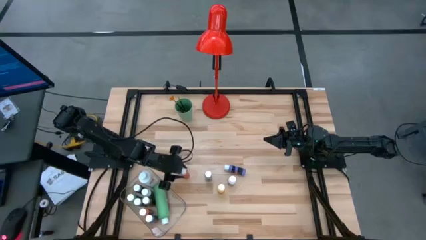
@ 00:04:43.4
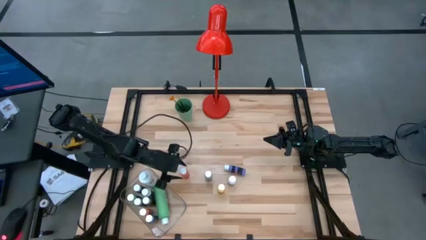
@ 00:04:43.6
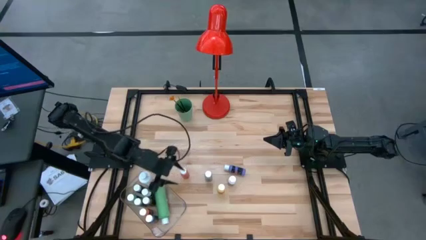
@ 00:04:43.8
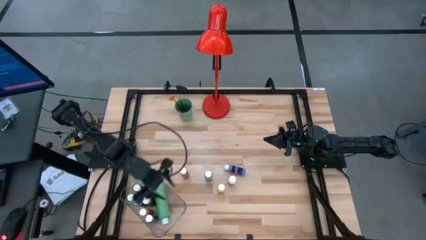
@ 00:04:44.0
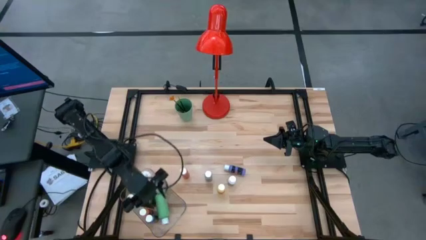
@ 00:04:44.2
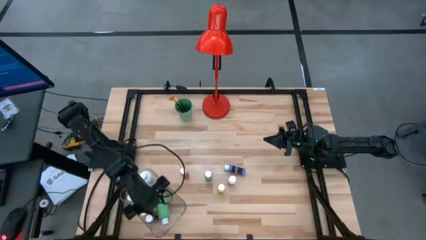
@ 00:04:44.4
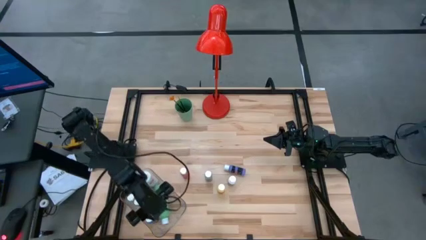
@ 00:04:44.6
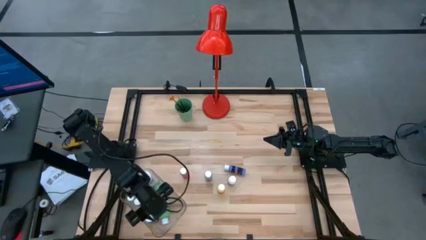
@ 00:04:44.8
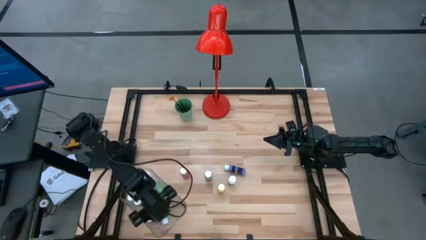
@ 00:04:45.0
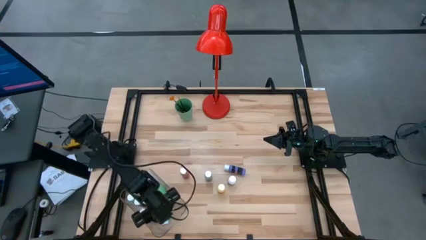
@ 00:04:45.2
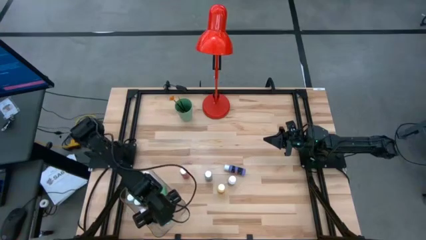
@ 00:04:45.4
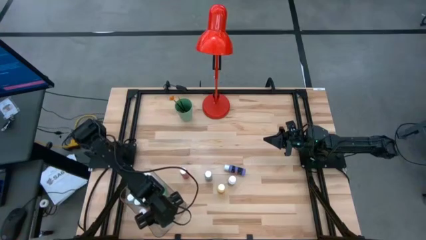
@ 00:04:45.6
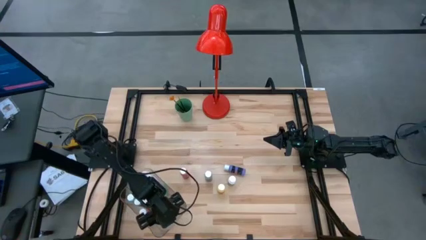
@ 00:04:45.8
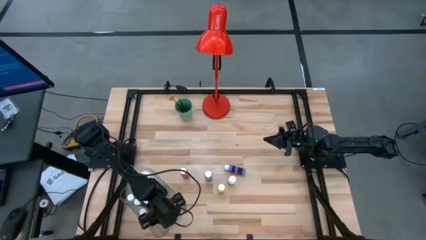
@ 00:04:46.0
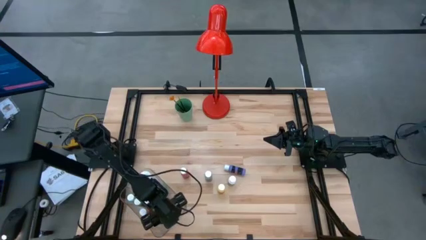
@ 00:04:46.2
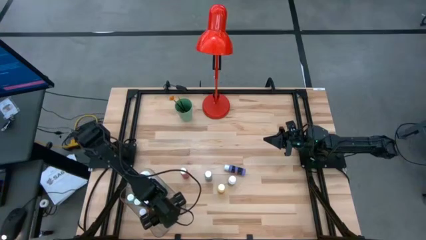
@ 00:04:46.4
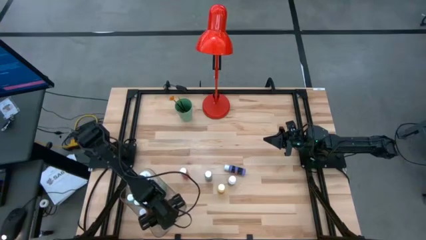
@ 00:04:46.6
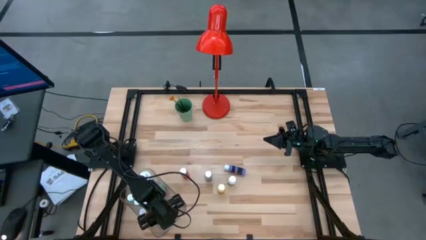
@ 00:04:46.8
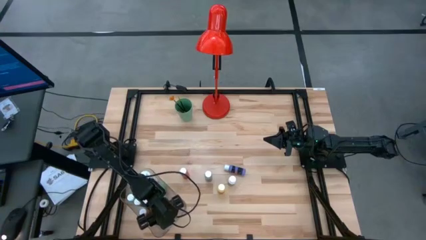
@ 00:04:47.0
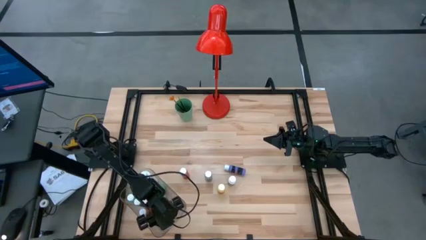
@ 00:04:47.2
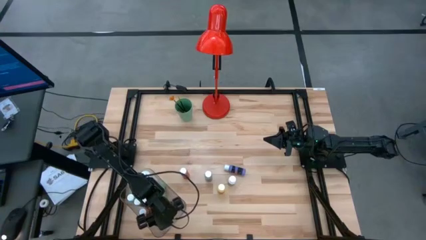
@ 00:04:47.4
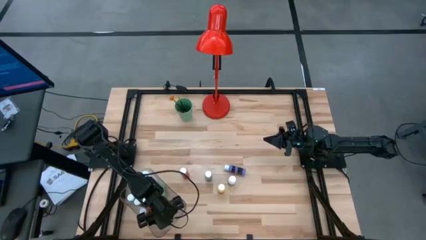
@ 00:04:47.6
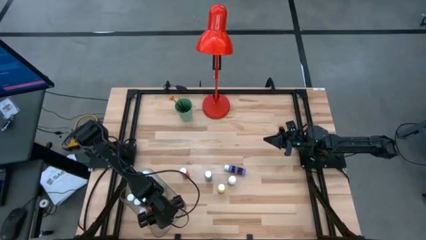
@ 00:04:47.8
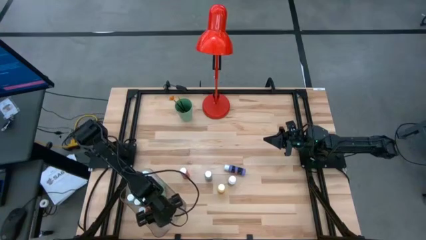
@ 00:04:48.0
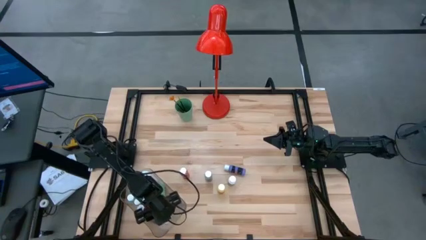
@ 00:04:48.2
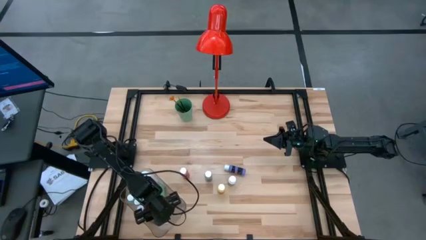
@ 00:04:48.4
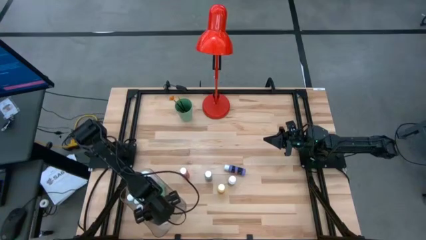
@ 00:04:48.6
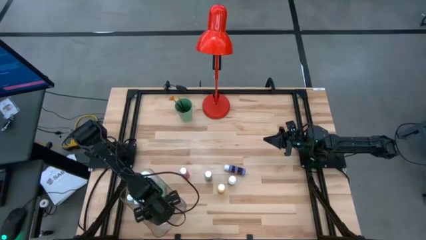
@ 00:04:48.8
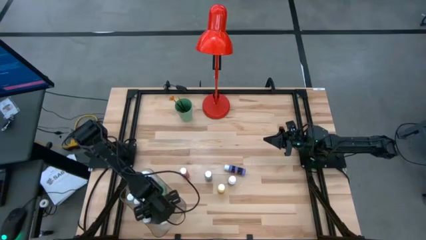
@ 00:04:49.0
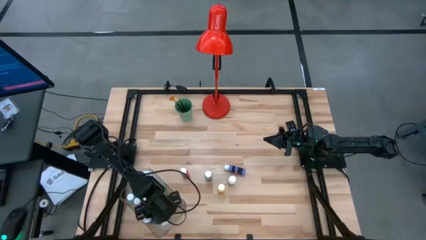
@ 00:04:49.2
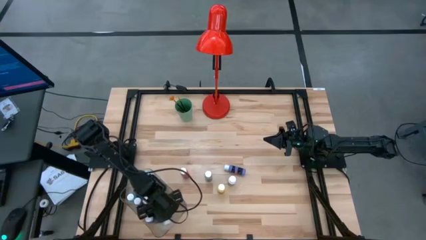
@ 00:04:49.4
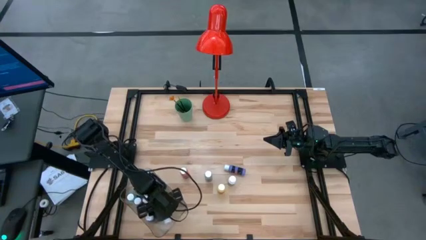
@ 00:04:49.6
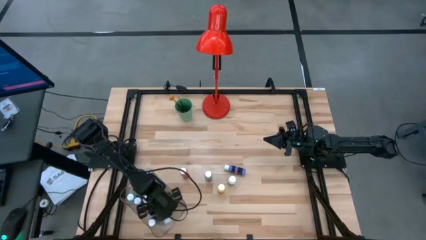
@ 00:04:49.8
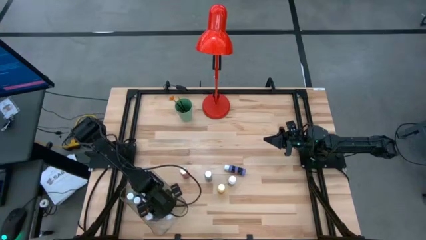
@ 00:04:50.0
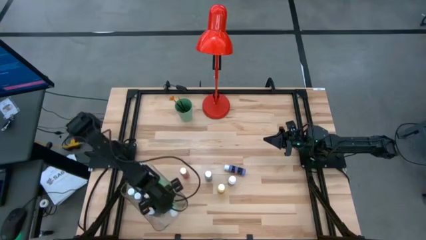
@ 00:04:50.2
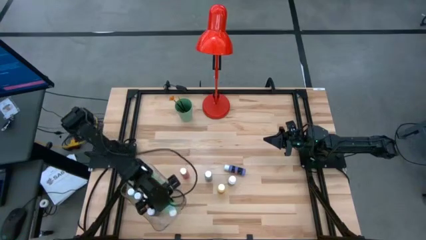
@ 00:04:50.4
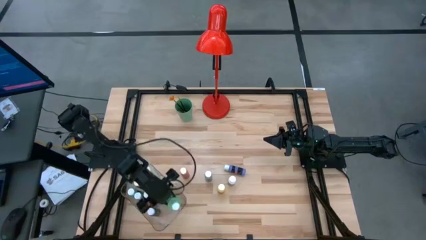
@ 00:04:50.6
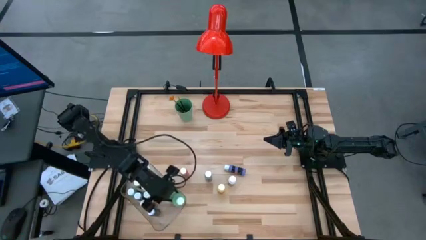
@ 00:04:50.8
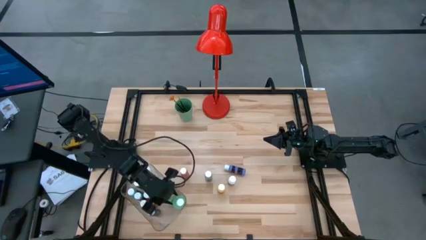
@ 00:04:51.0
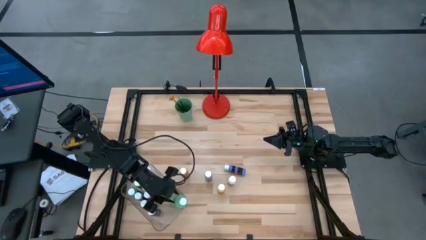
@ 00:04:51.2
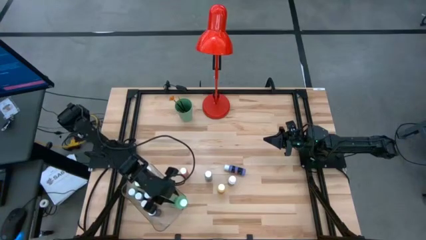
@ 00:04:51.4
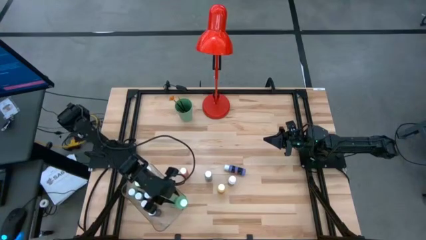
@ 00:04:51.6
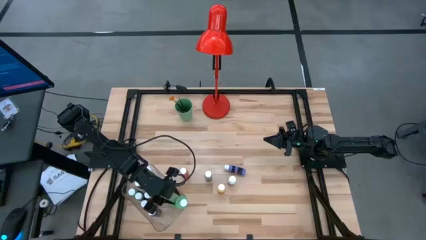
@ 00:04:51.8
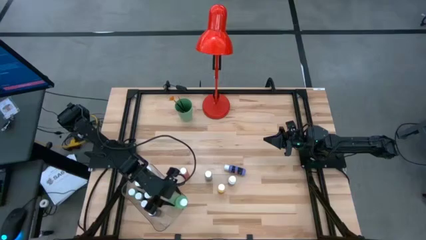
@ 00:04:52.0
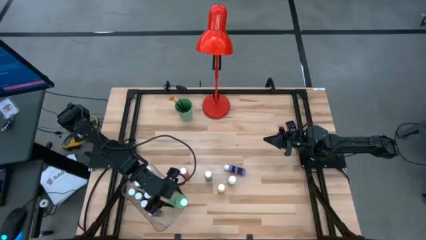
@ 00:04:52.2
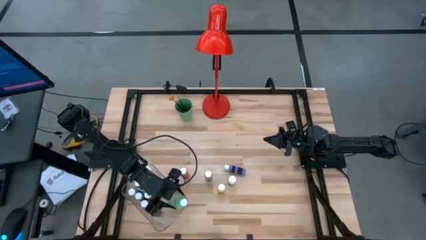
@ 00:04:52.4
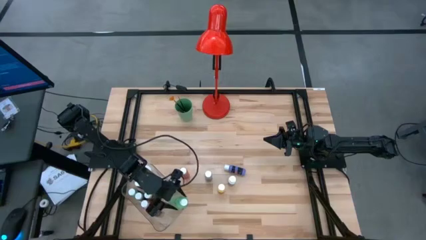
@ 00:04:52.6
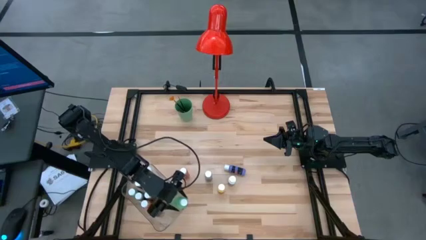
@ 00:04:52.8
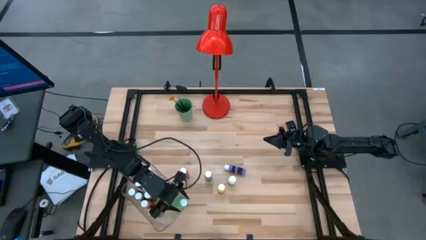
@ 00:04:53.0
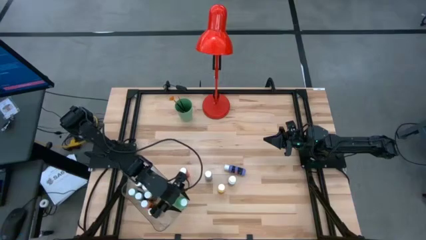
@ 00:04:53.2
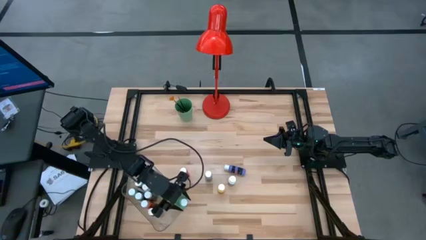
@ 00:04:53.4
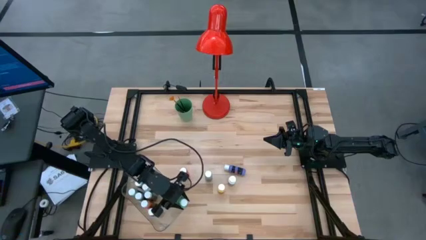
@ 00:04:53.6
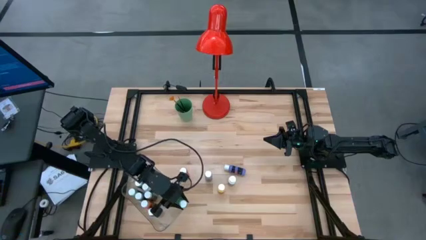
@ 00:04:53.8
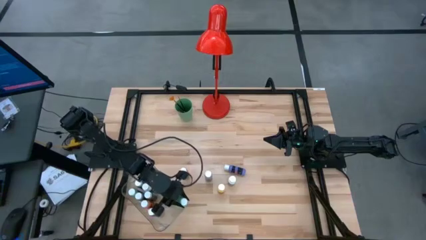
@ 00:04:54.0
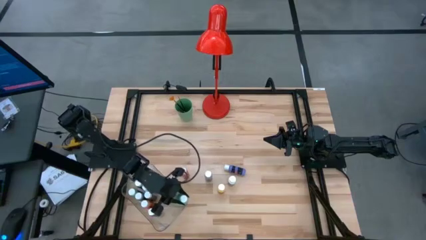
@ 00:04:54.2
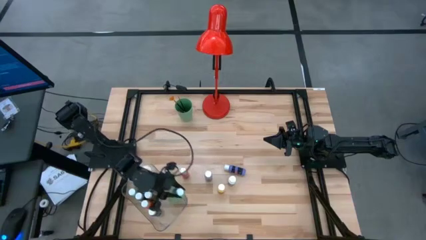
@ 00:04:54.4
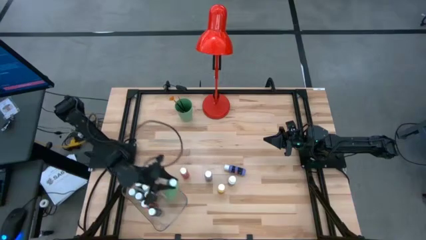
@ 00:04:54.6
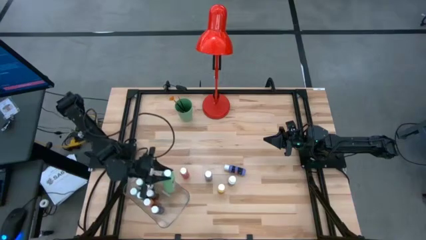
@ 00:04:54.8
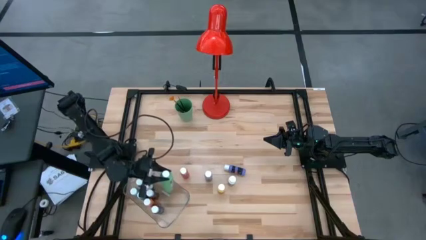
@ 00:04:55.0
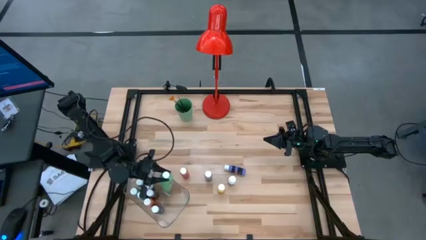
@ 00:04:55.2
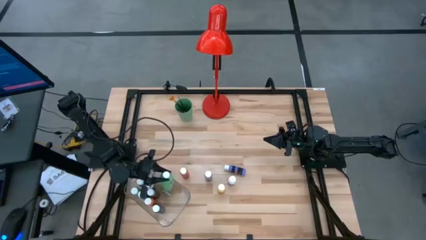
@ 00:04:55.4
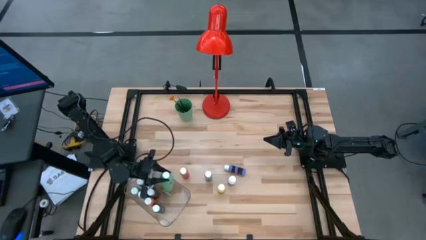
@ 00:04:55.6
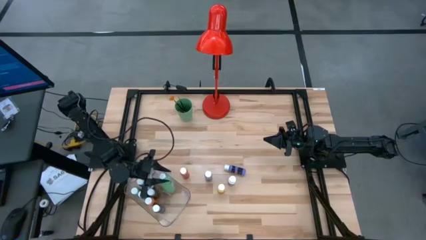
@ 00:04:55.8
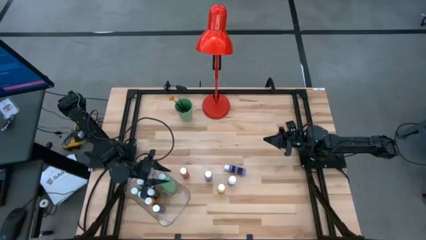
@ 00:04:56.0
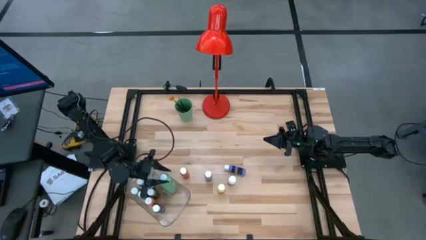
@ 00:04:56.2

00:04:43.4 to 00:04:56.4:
Task: Pick & Place Paint Supplies
Adjust the light green coloring bottle in the transparent bin

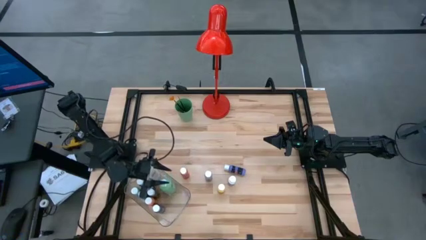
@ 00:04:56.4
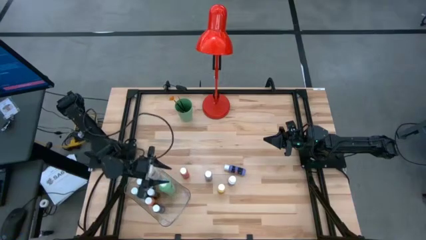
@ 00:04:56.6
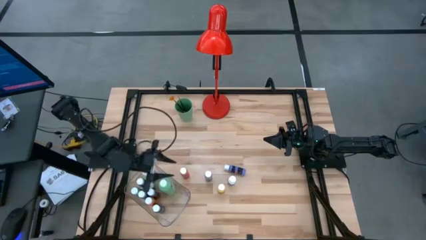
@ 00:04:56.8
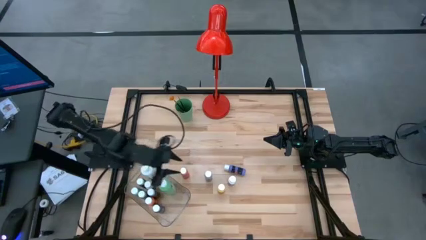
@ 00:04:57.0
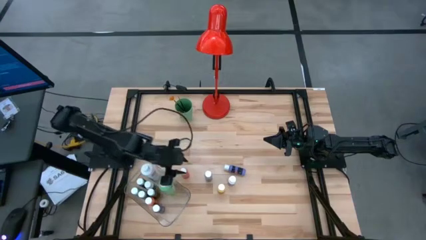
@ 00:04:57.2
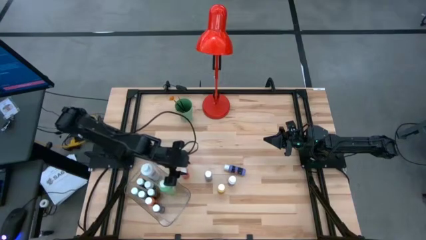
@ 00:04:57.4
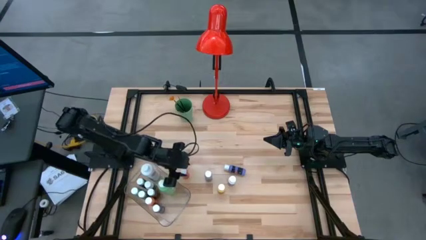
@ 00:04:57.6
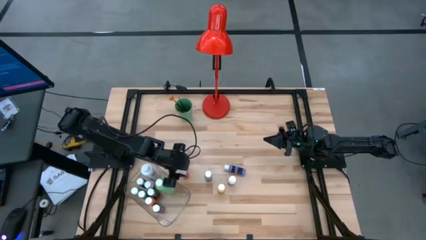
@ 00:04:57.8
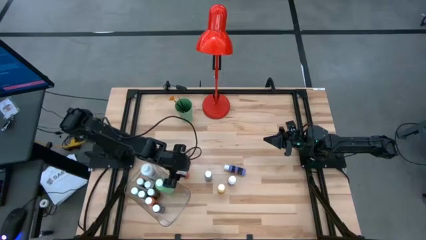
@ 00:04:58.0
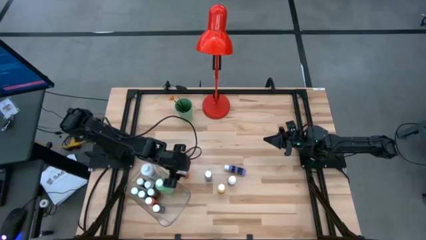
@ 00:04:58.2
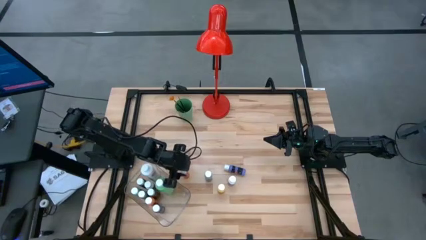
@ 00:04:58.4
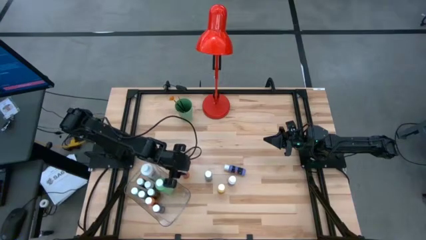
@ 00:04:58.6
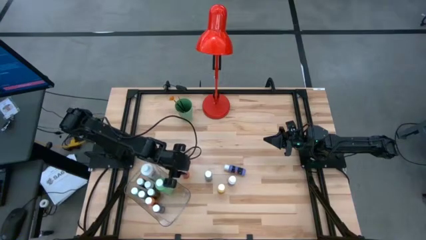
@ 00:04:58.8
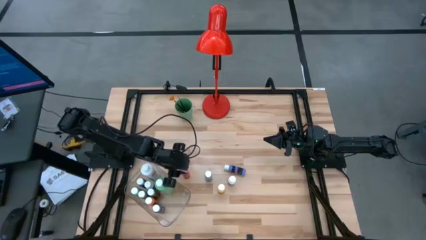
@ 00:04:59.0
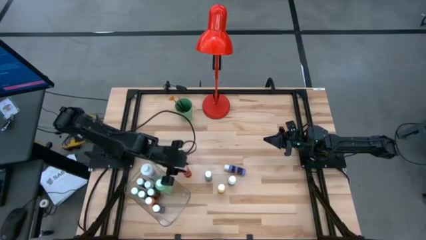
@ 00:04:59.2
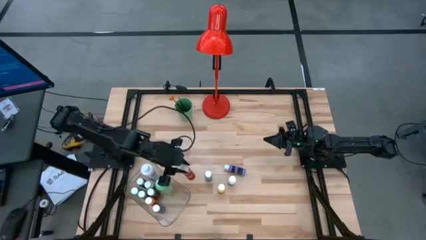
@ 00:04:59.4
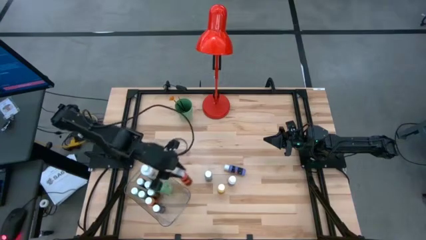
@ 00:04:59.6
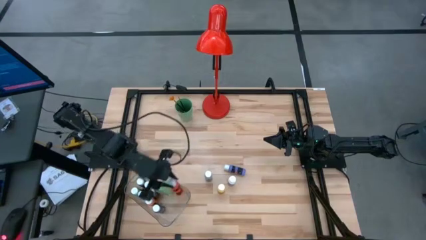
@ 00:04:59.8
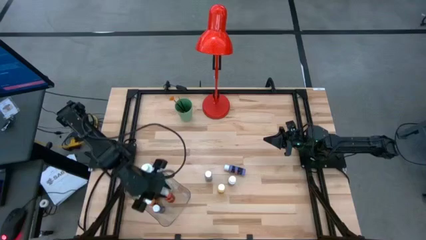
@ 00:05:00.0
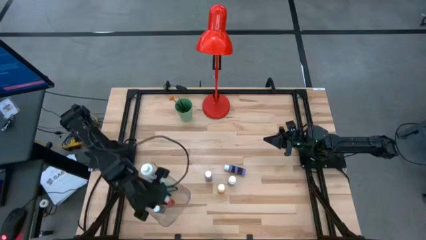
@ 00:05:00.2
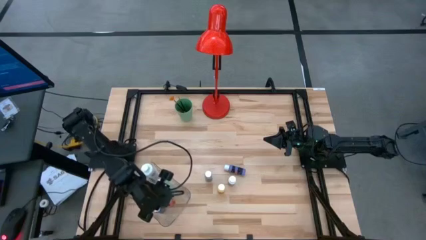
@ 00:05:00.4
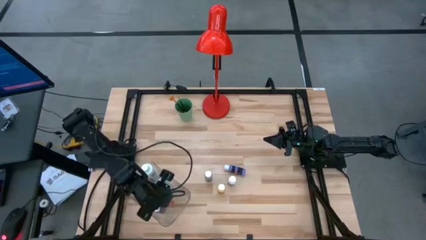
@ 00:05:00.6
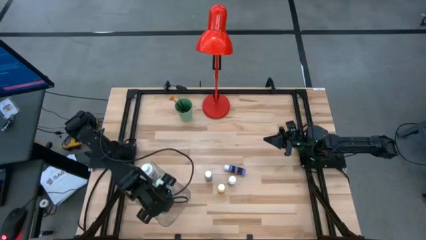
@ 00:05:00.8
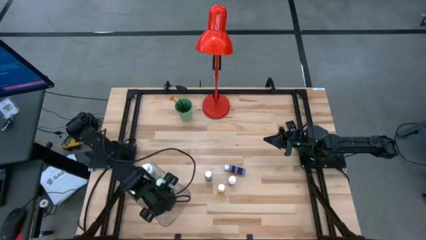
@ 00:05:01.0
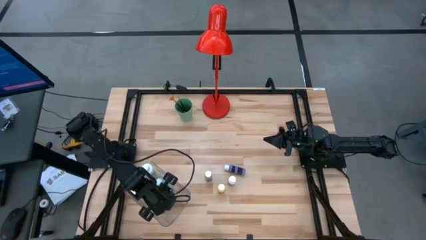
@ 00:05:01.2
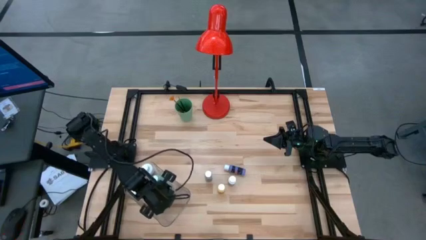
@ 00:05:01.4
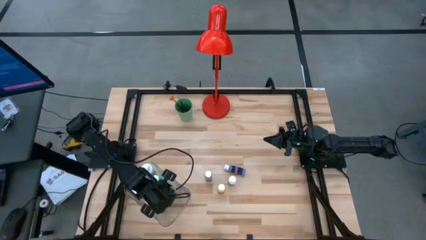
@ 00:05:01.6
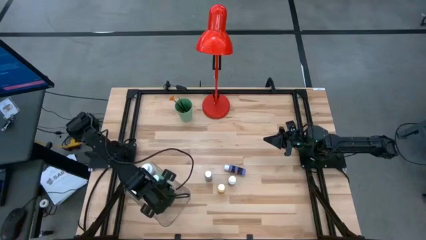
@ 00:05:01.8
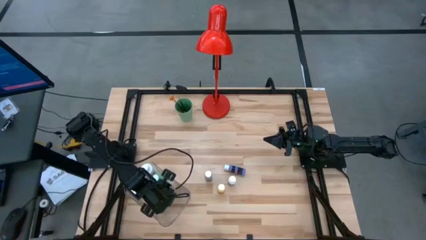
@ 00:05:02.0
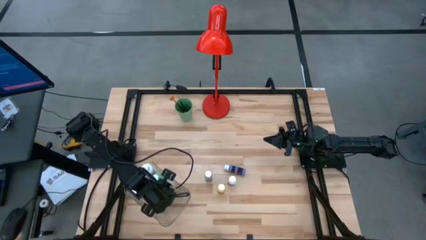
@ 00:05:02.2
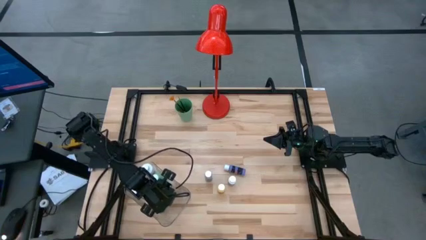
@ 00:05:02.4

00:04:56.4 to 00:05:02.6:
Put the orange coloring bottle into the transparent bin
